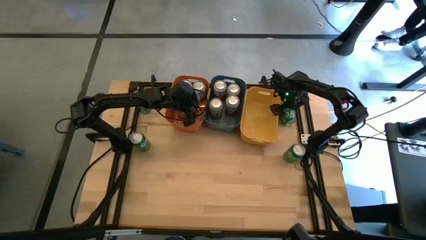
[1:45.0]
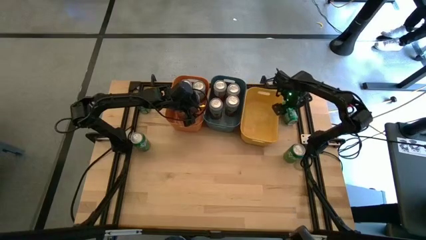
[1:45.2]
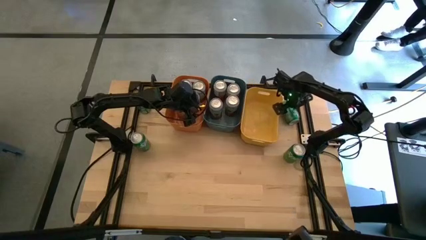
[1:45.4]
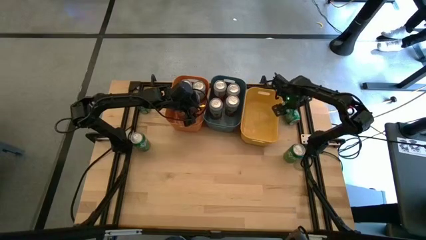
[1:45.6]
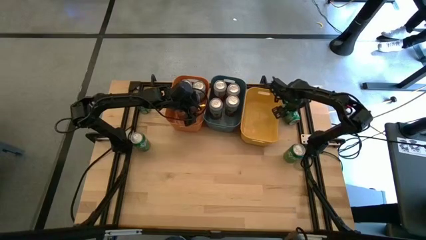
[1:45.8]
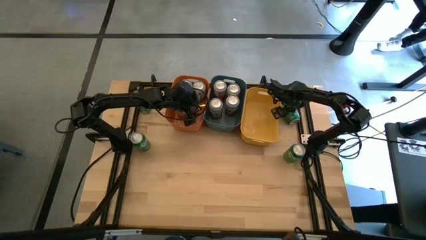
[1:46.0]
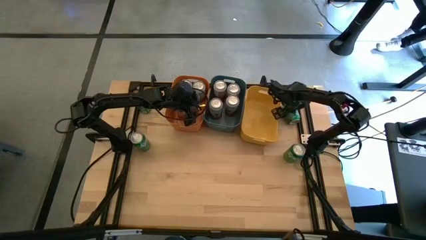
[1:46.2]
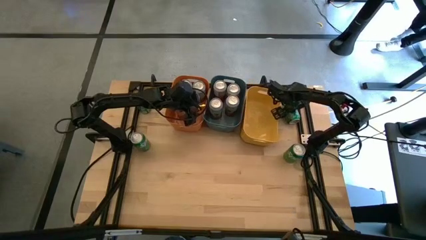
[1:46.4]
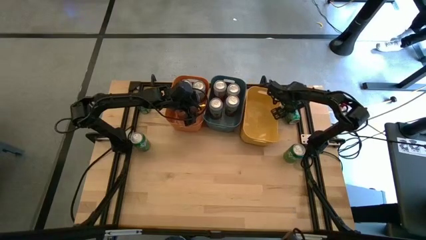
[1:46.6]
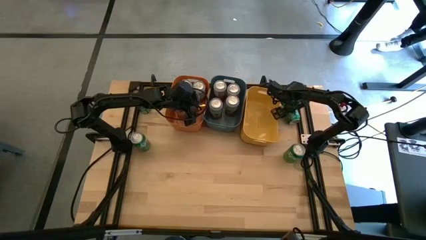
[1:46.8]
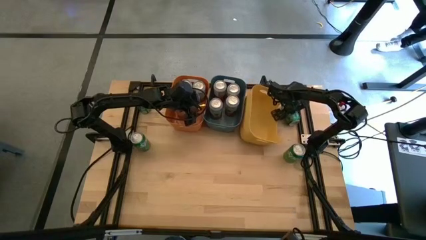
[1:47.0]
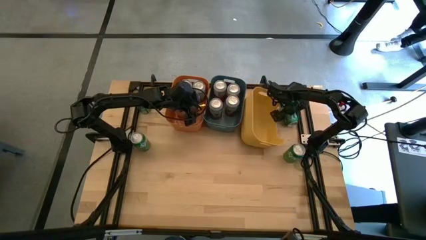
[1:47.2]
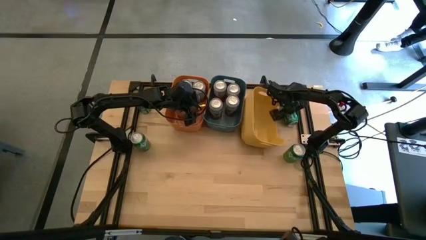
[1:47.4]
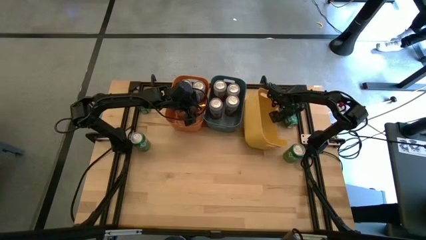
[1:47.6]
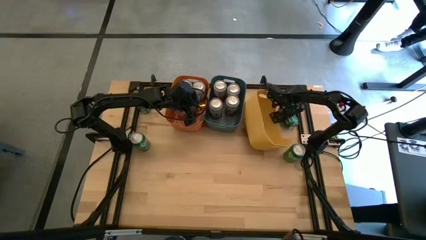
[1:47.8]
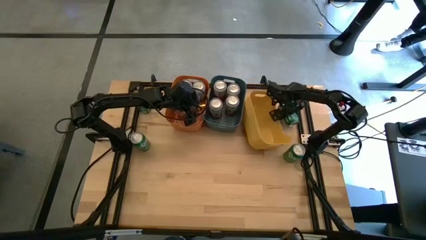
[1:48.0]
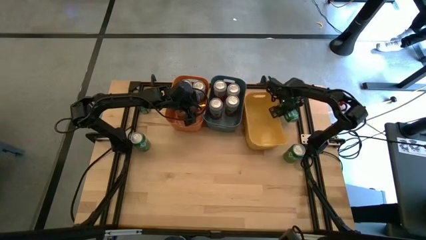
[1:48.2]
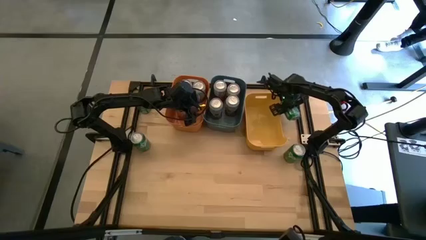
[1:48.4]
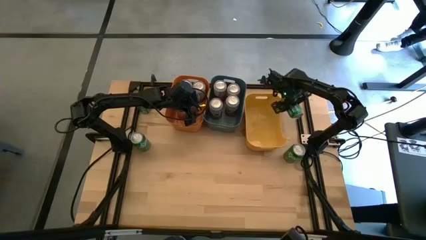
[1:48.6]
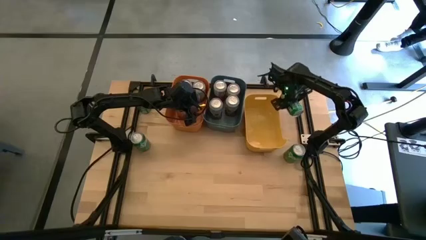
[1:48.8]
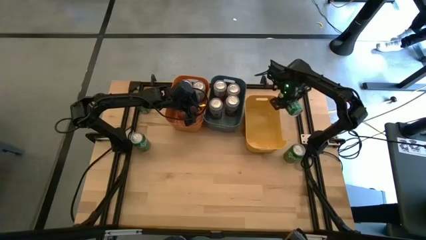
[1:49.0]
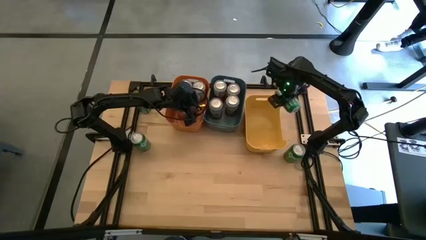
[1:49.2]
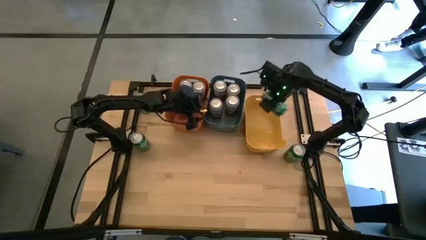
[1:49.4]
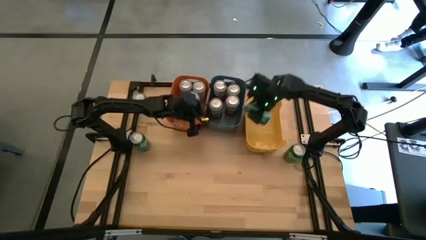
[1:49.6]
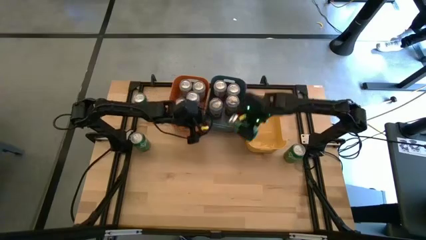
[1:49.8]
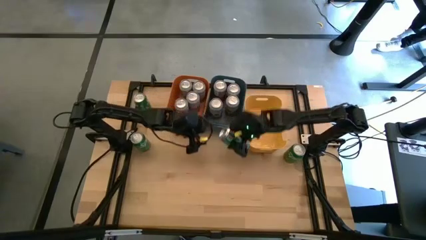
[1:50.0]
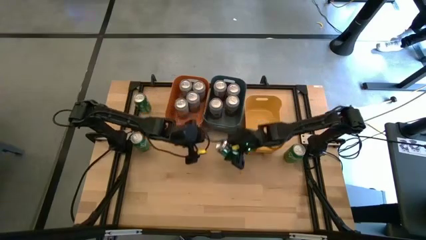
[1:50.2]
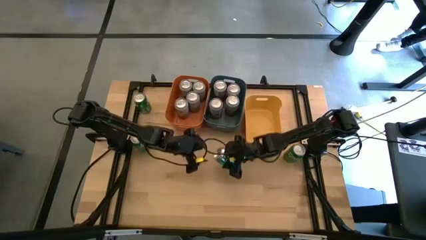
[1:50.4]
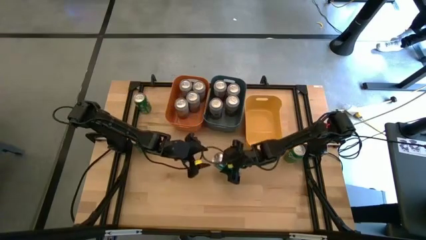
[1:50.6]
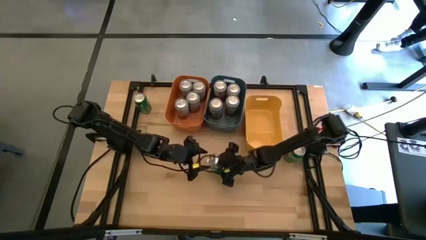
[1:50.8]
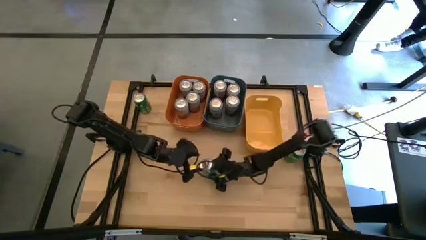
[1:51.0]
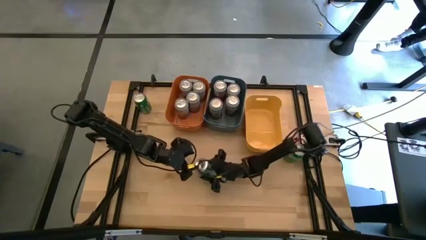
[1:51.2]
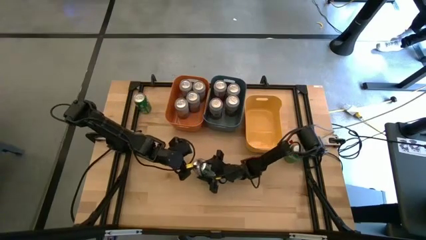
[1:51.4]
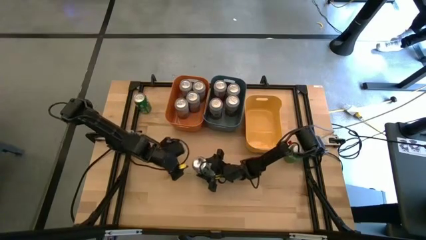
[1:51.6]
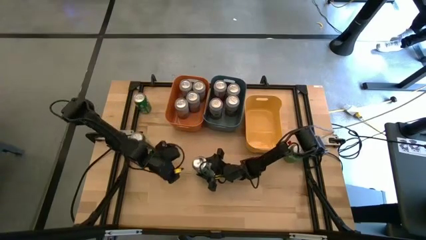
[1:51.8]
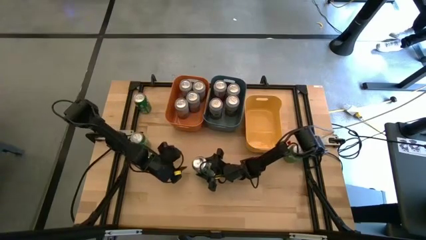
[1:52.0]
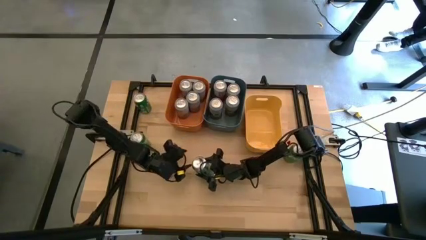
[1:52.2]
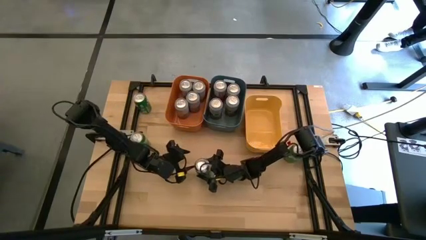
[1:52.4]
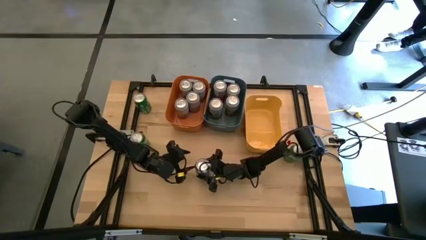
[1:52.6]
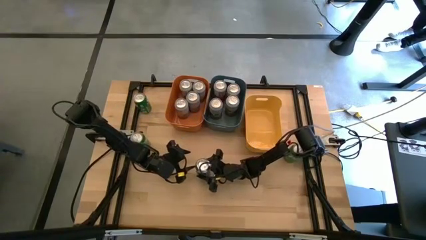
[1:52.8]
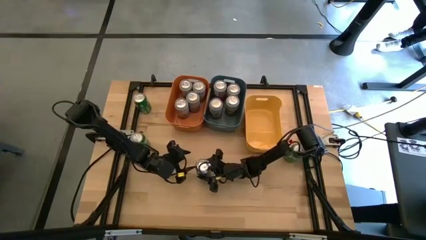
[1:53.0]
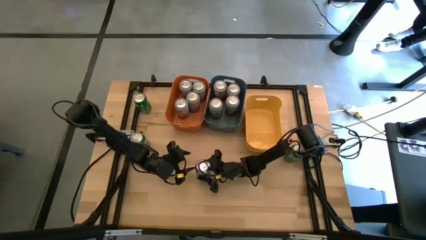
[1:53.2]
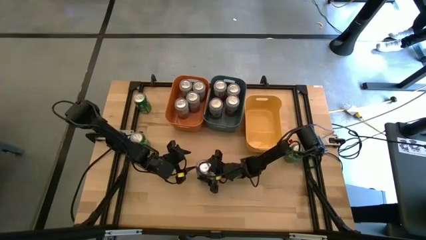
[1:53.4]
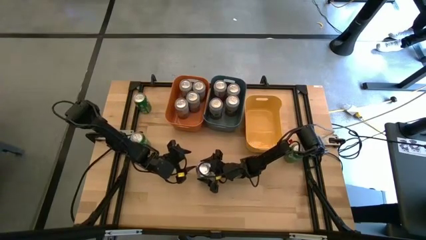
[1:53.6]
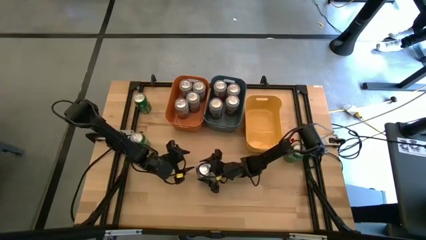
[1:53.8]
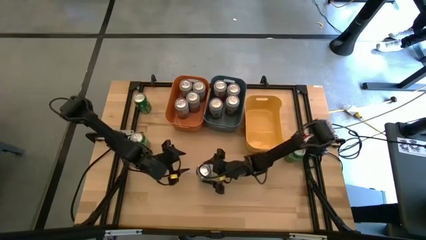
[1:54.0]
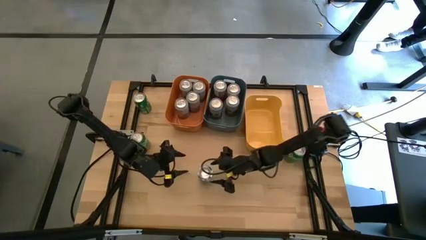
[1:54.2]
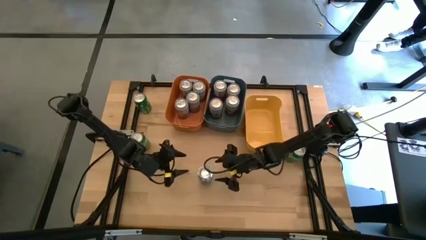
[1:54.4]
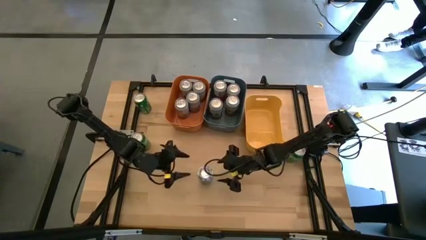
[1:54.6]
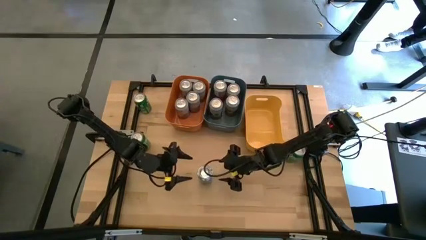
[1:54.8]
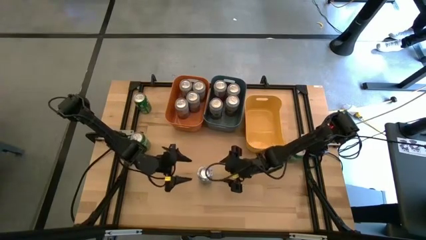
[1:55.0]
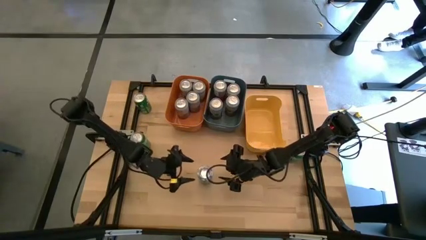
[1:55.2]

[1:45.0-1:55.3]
Task: Sort soda cans
Put the top right green soda can into the yellow bin
